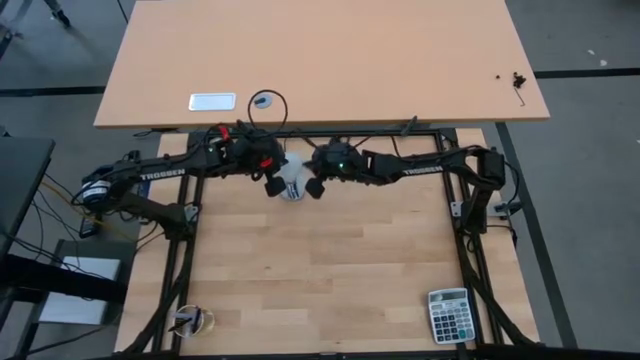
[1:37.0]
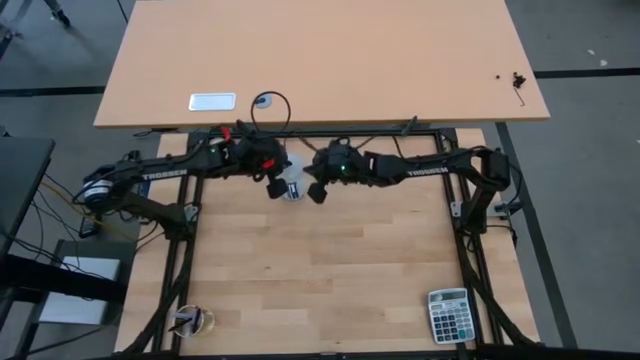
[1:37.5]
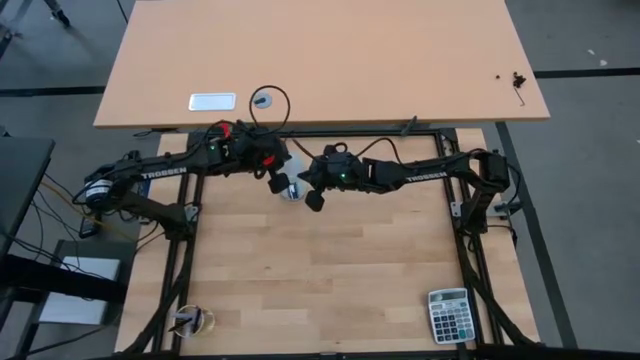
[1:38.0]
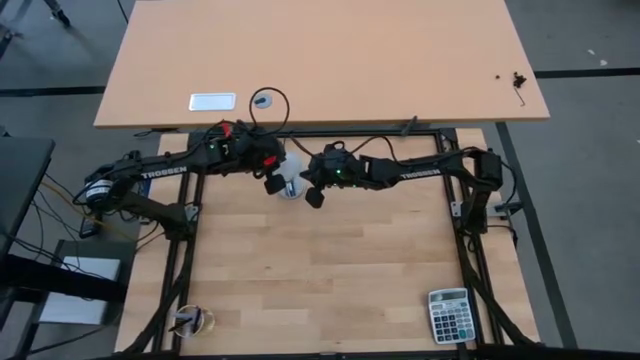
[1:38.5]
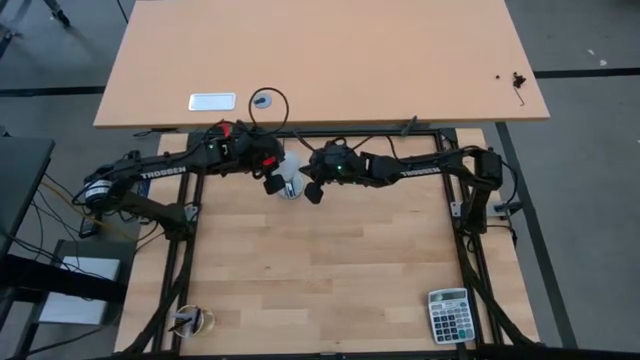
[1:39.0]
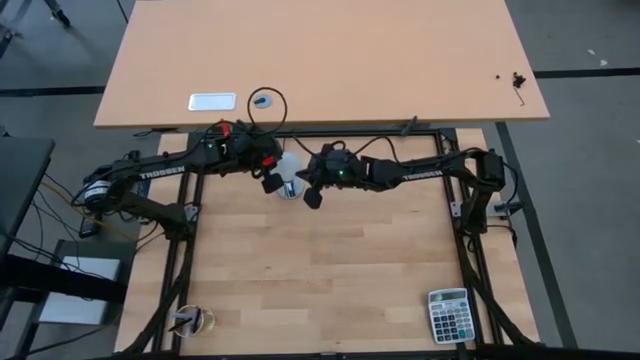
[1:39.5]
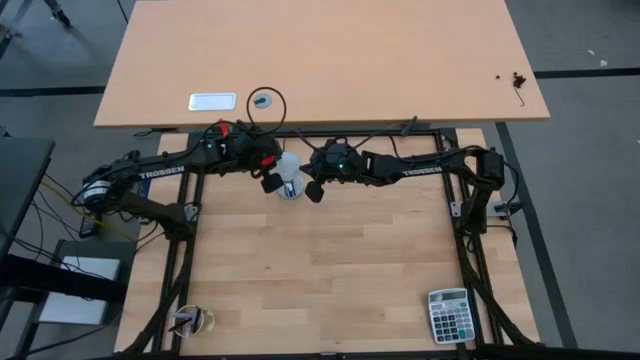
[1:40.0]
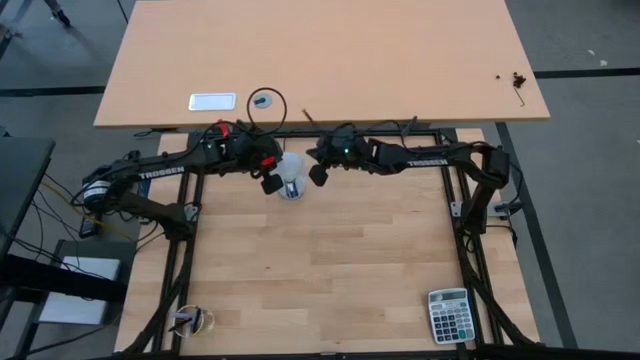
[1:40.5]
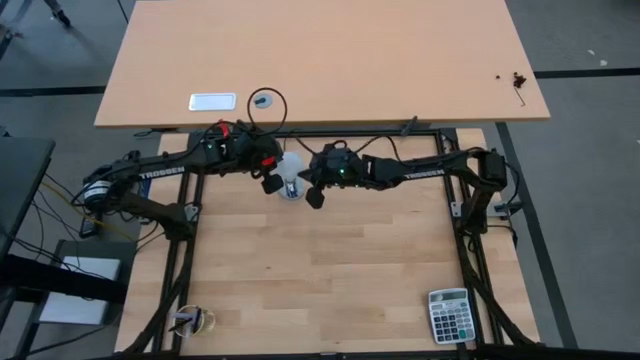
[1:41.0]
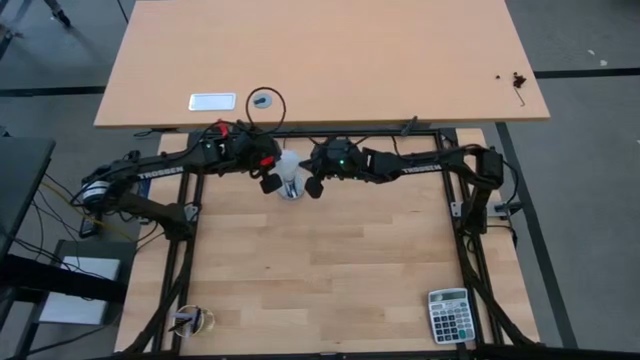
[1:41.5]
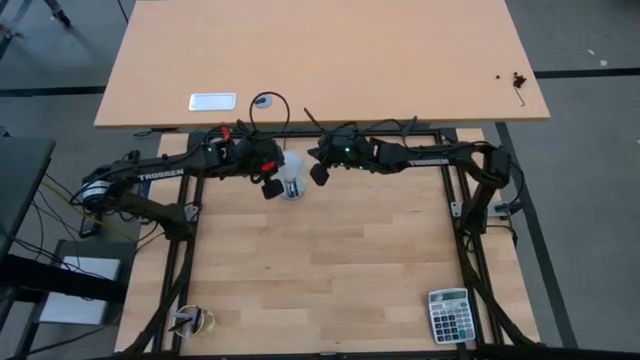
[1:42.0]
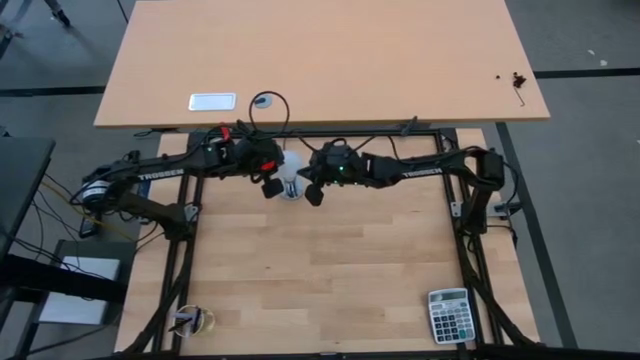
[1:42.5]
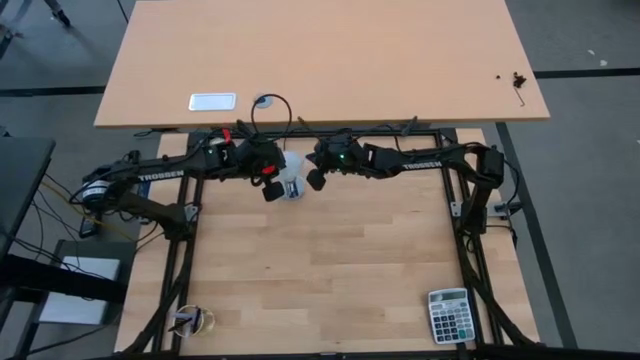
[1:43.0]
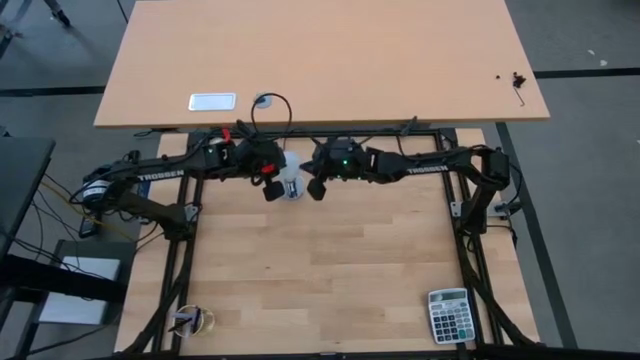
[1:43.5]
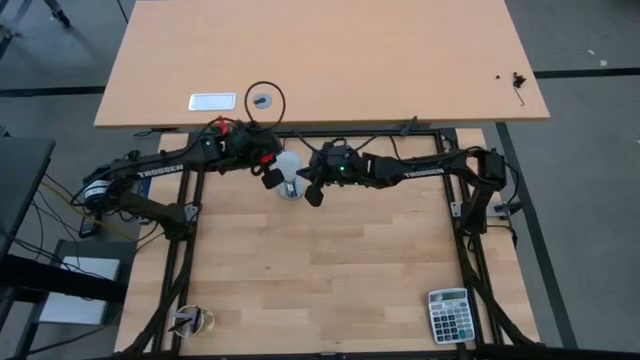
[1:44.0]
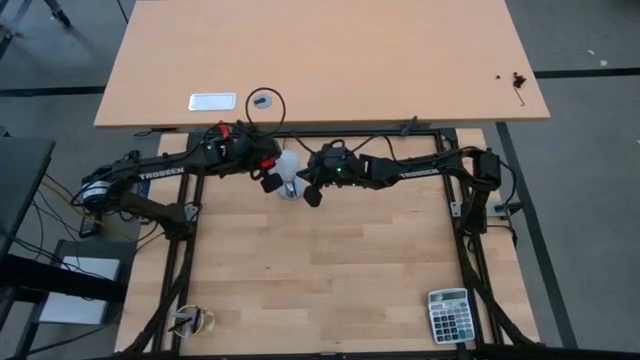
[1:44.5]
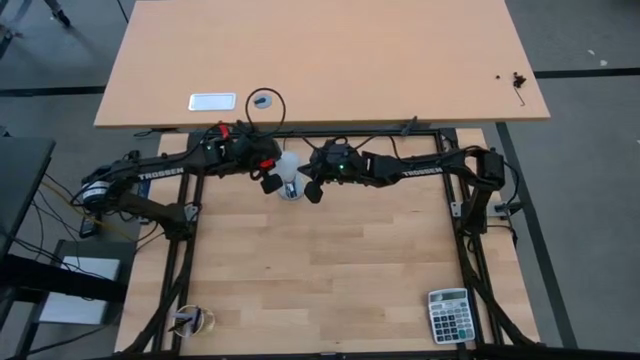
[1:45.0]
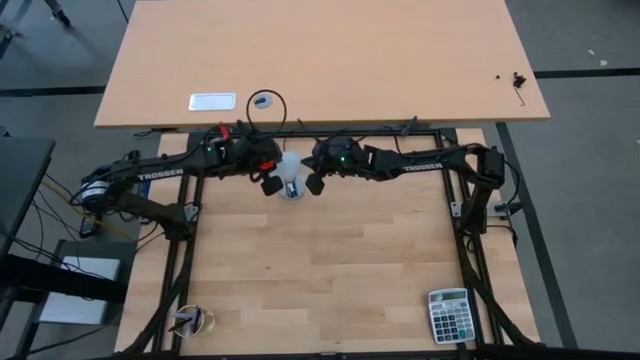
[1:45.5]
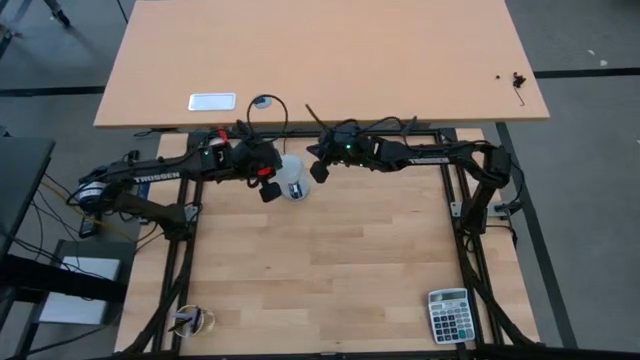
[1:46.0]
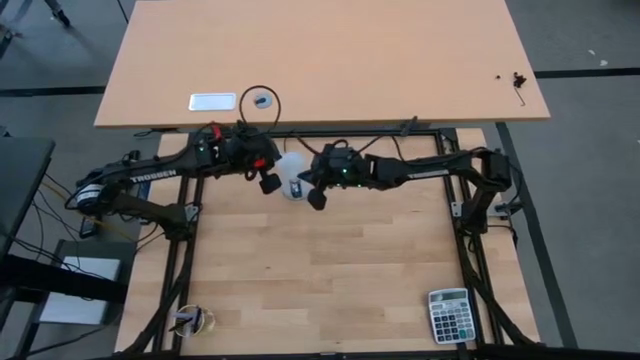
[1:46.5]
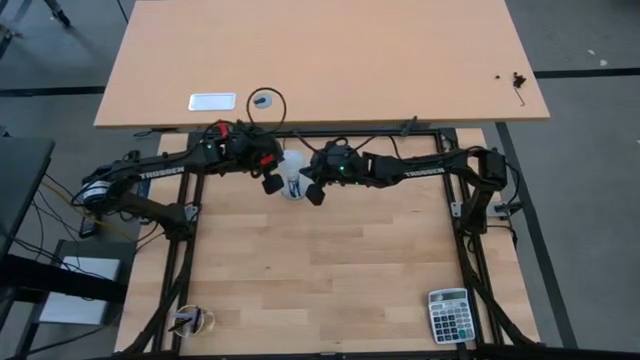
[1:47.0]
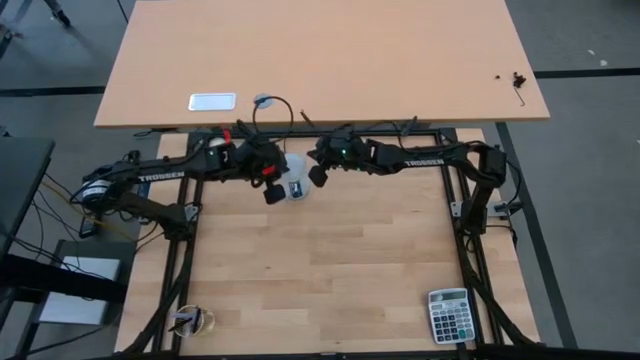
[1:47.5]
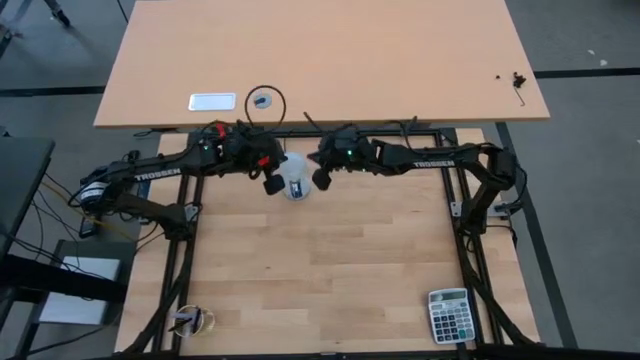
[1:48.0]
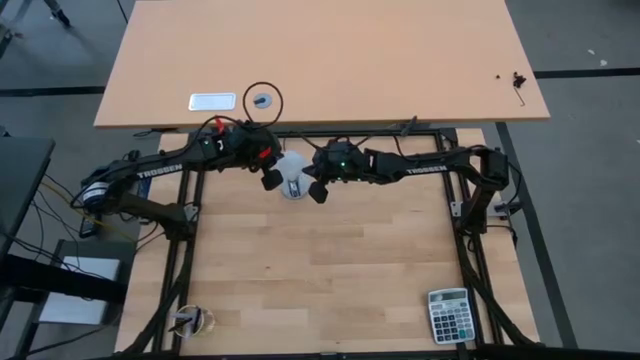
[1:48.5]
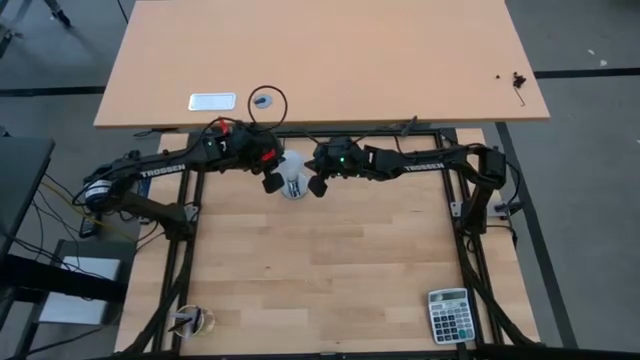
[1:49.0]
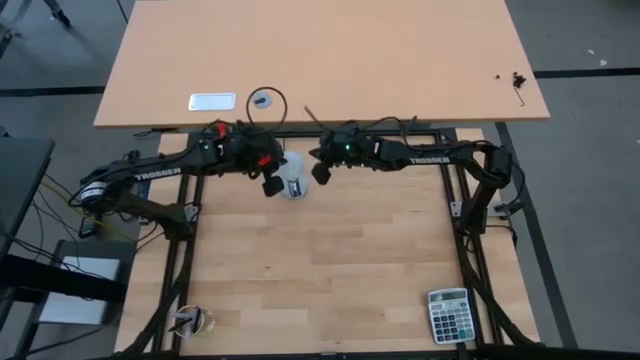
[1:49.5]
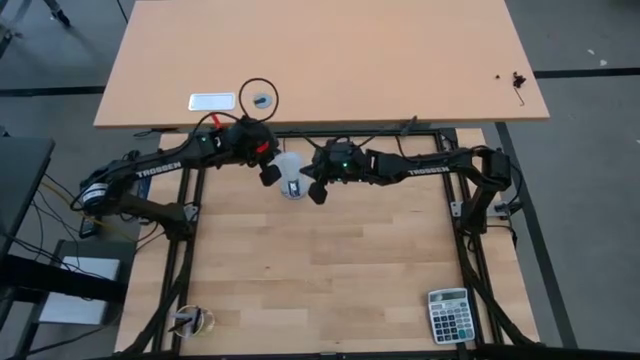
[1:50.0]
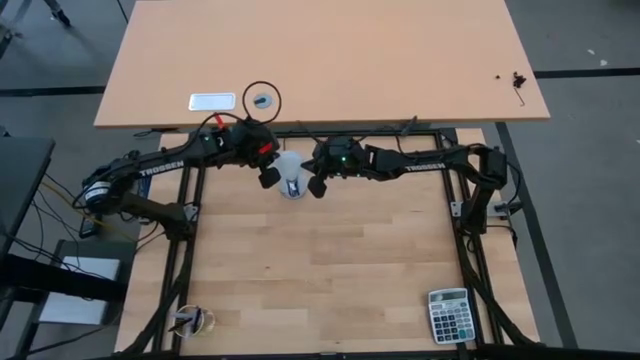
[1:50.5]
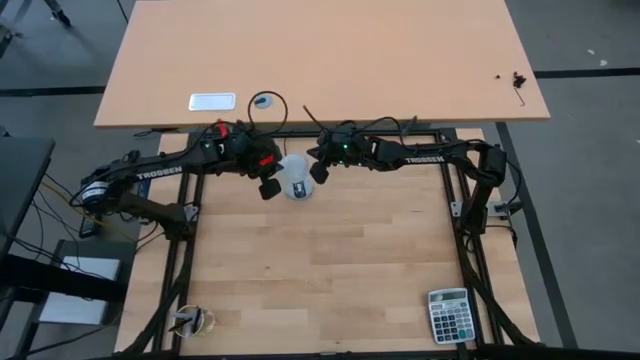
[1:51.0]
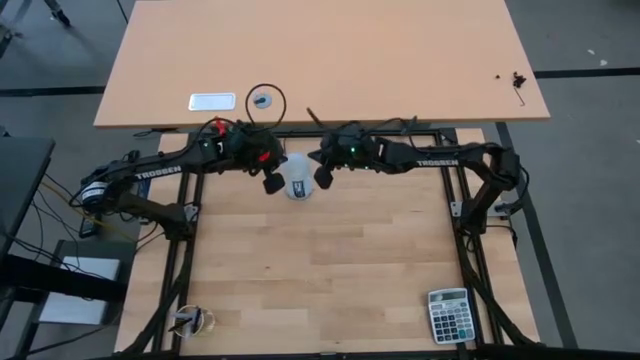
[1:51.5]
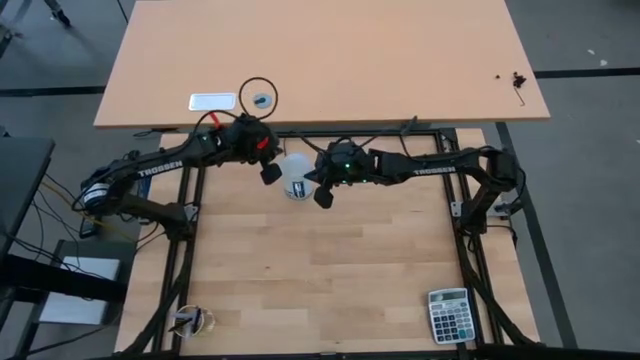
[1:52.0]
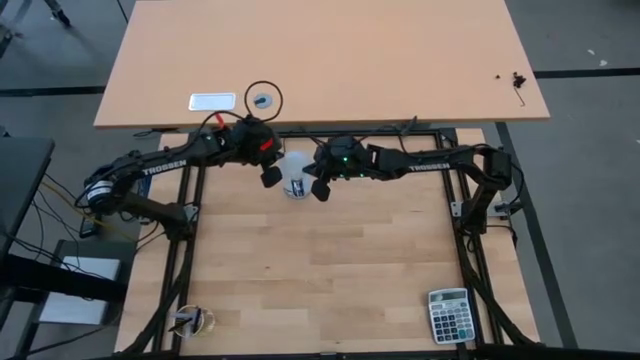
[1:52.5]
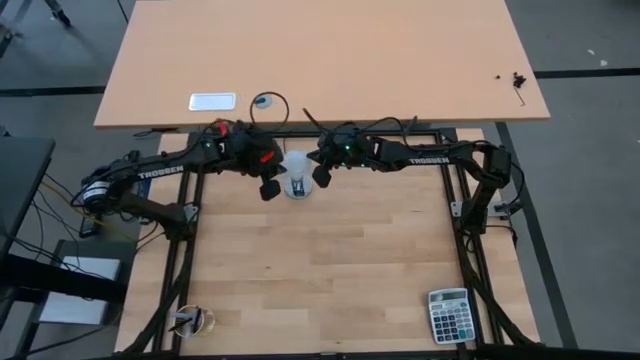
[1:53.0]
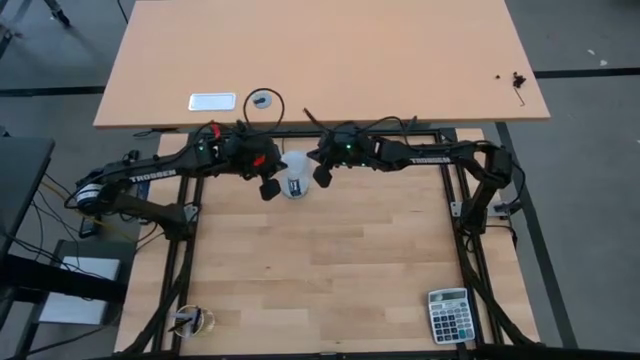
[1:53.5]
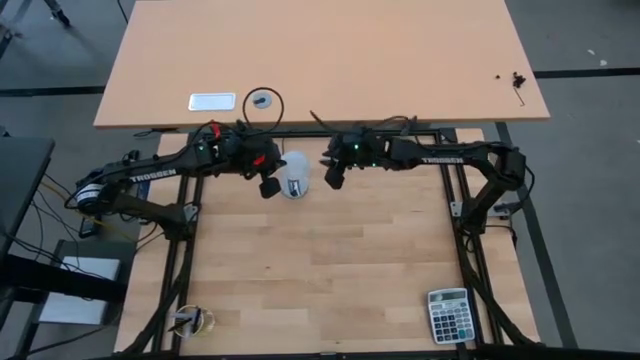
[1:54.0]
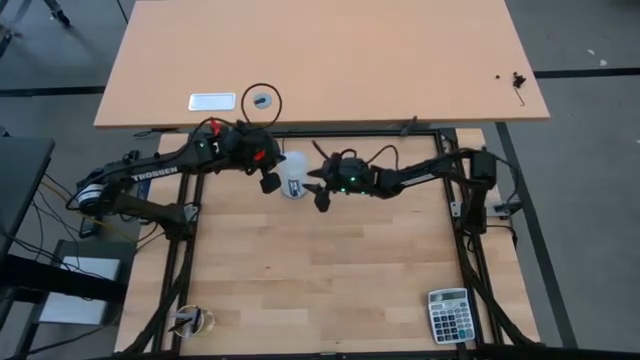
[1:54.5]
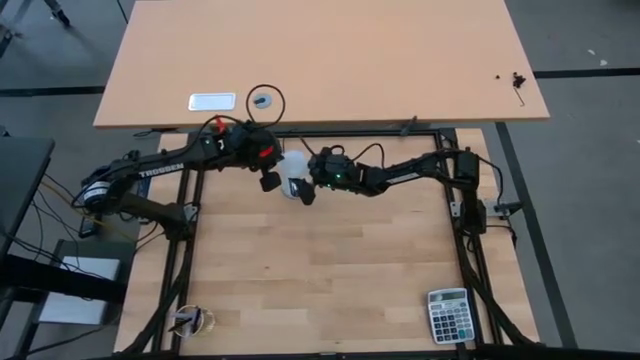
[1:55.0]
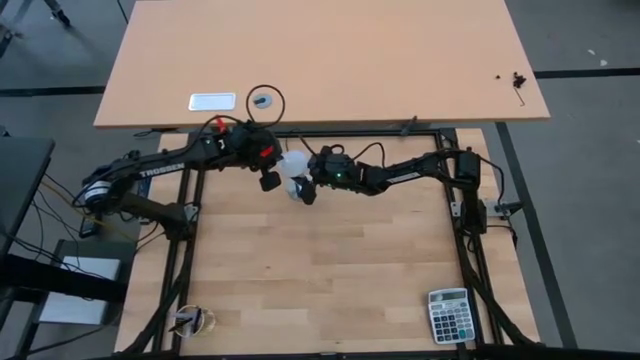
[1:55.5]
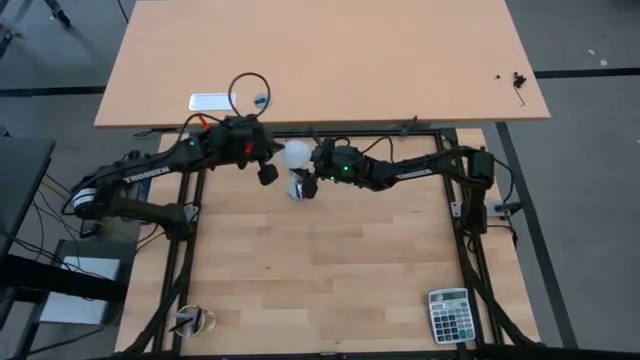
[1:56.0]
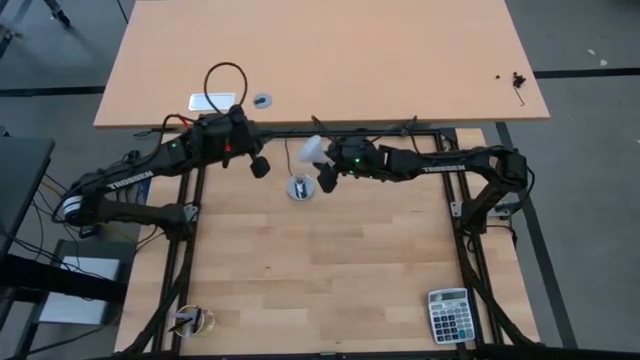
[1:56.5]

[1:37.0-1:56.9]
Task: Screw lightbulb
Remove the white light bulb from the silver lamp

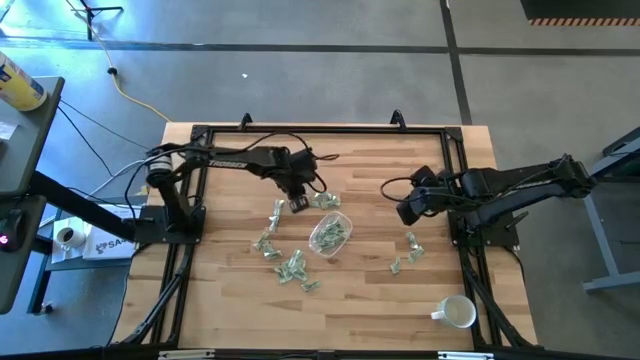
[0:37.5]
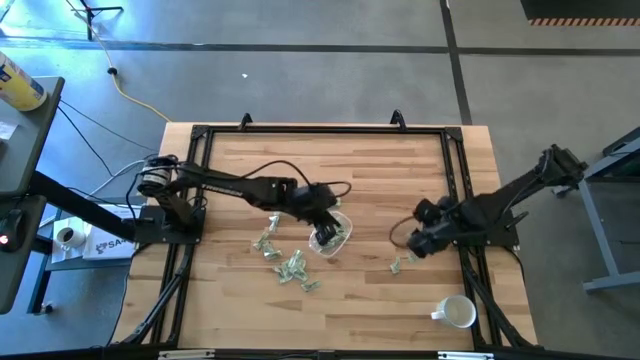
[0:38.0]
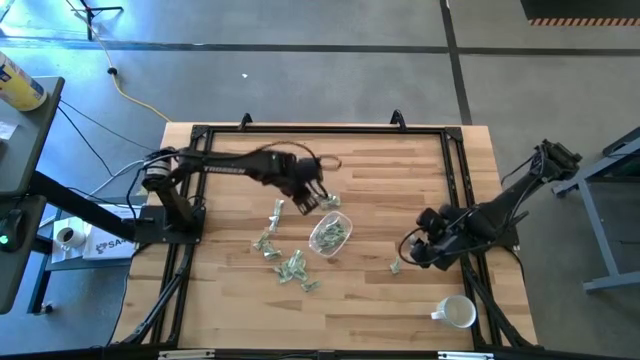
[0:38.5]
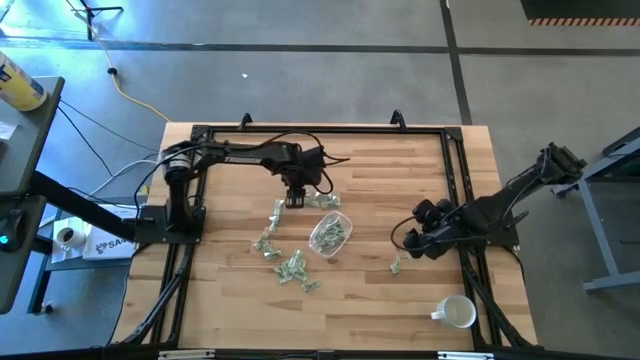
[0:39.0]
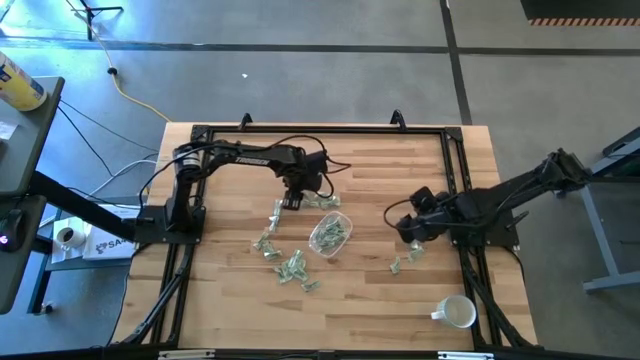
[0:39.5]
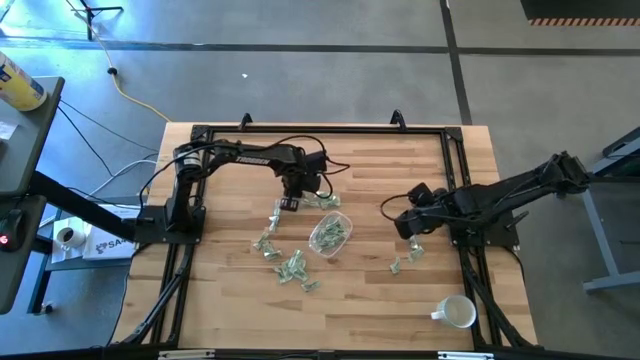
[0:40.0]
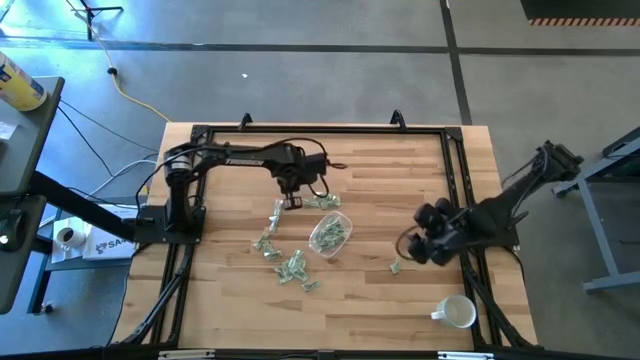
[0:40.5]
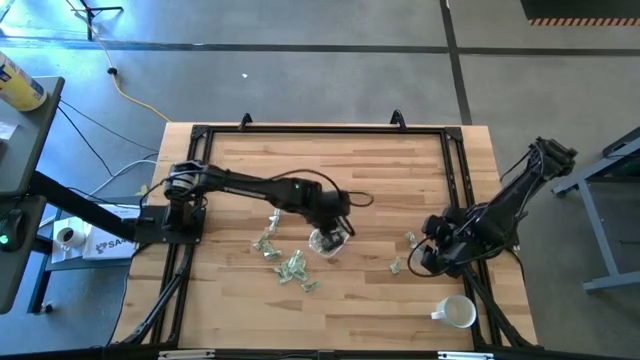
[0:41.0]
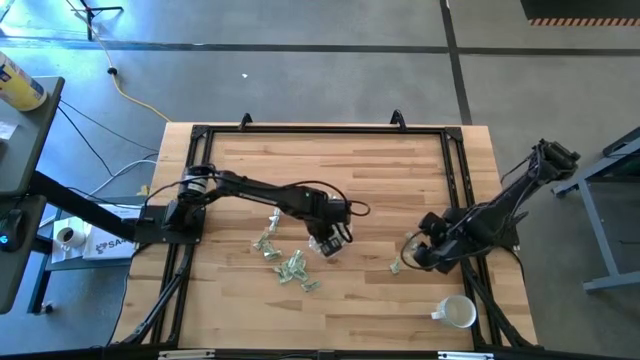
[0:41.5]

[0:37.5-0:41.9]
Task: Pick and place Stevia / Truvia into bins
Put the stevia packet into the transparent bin
